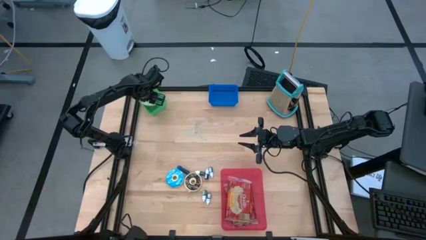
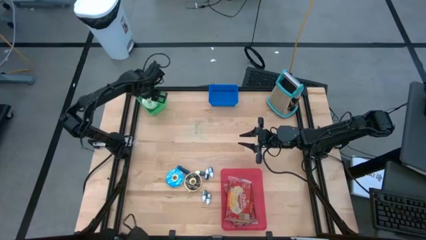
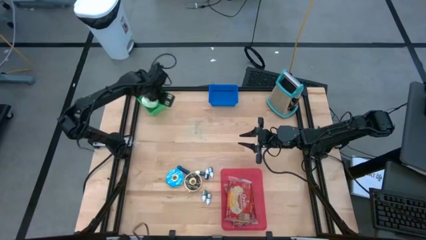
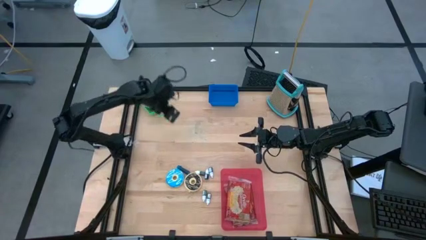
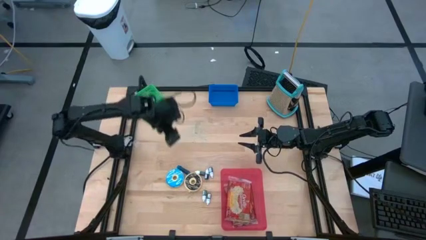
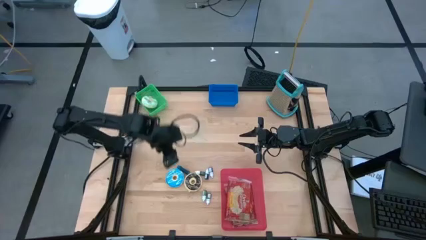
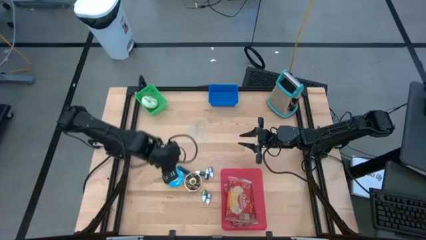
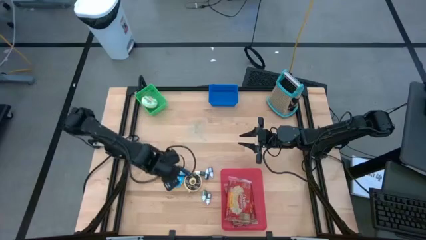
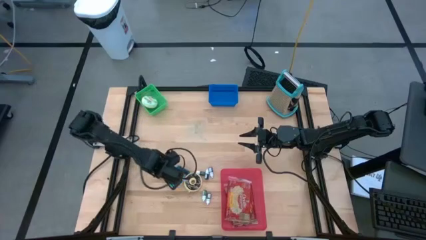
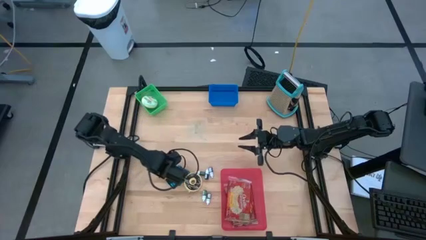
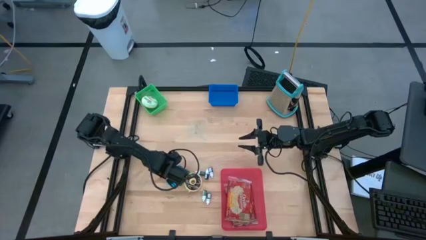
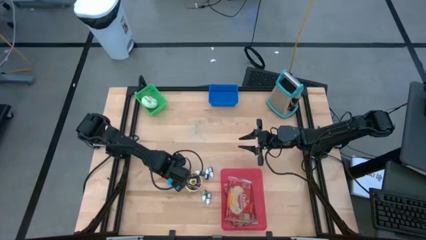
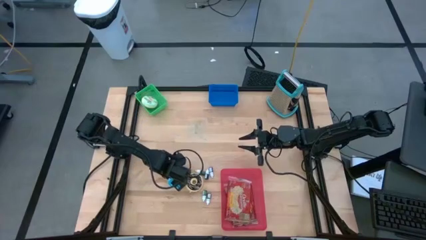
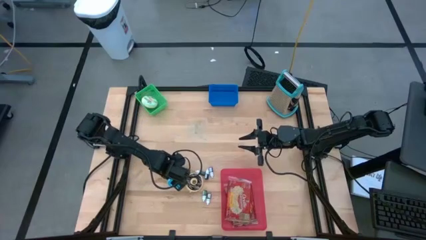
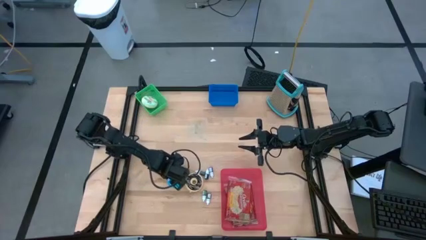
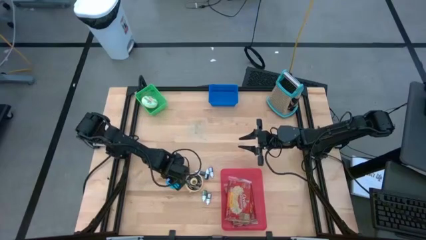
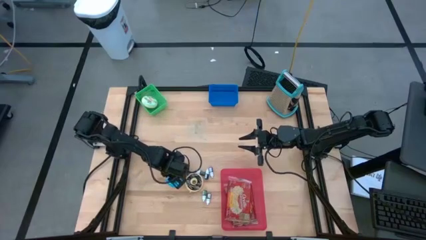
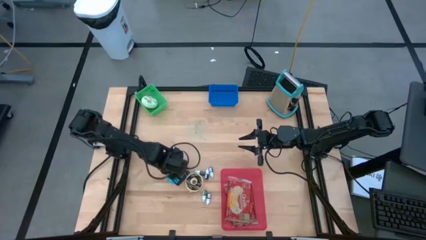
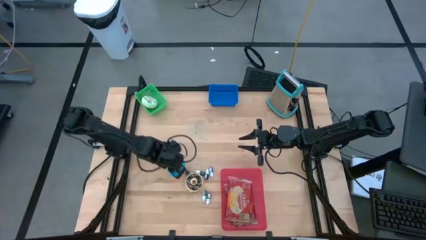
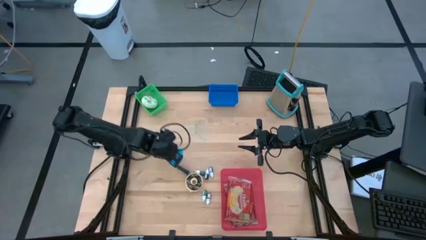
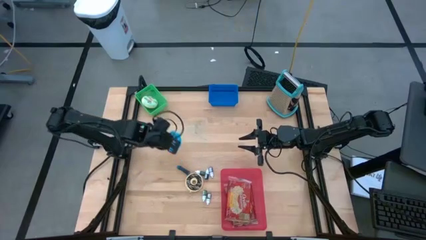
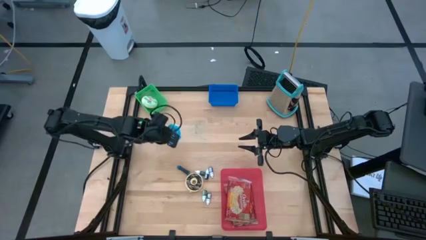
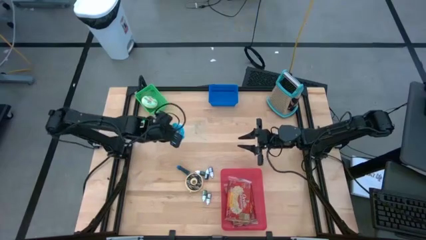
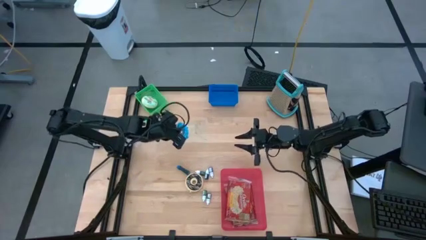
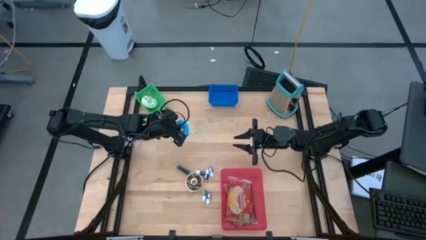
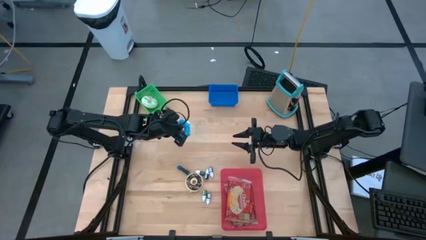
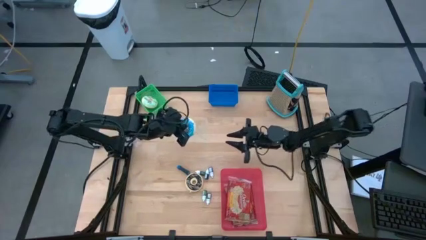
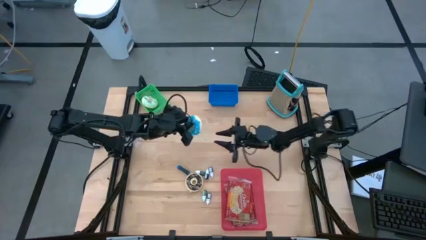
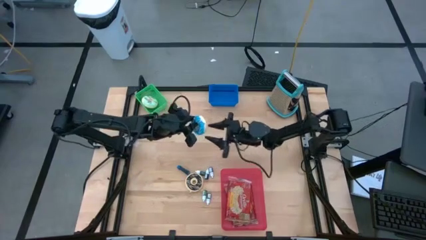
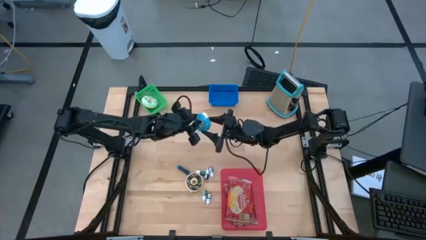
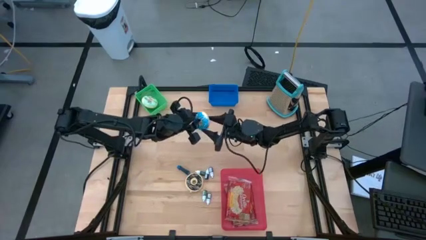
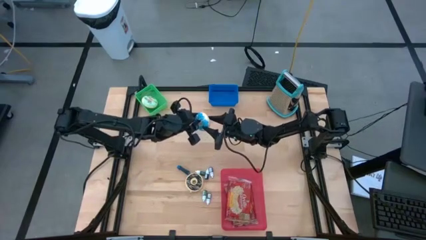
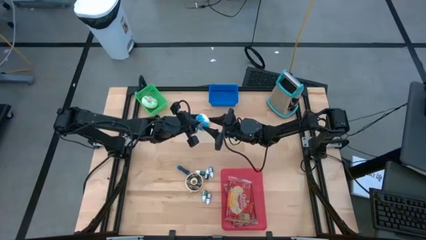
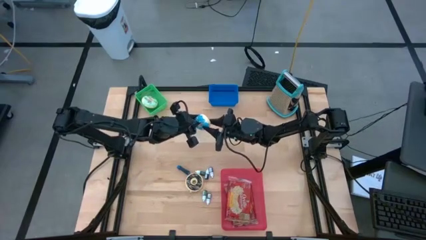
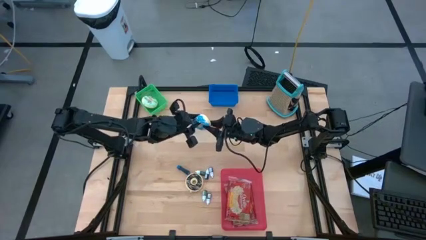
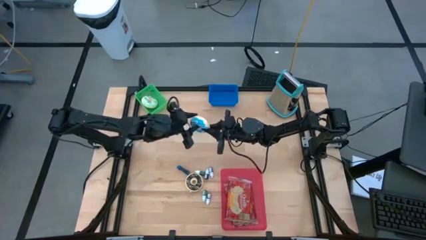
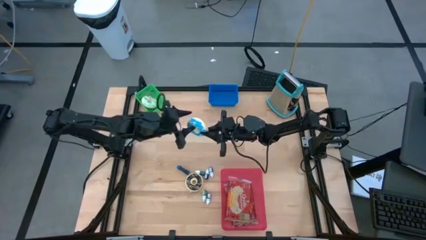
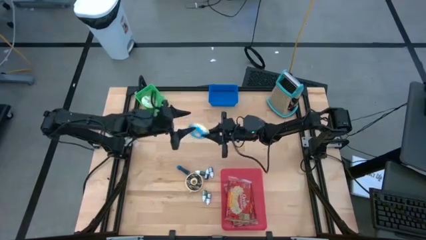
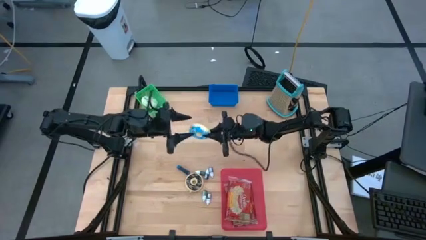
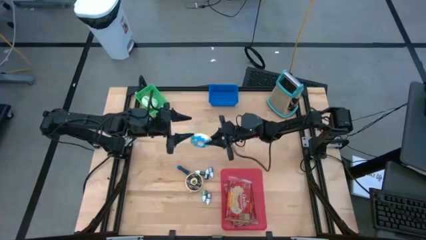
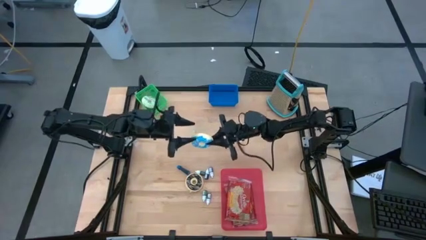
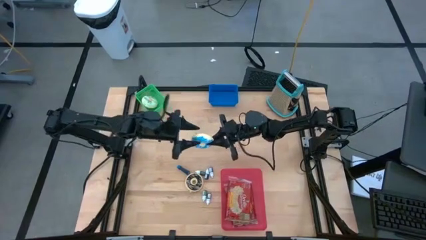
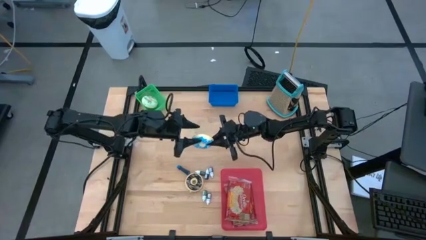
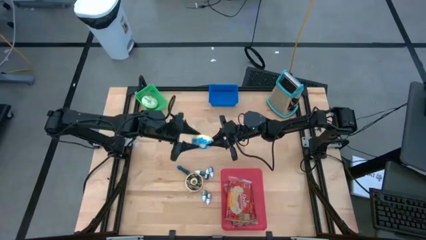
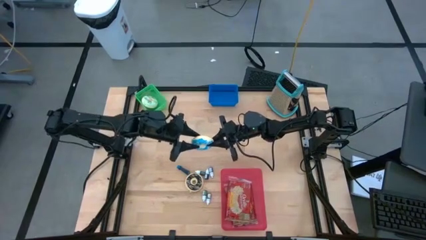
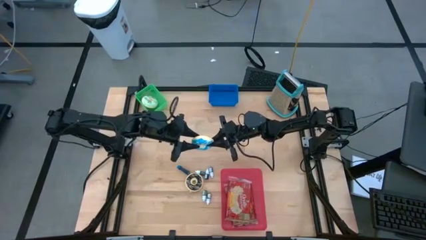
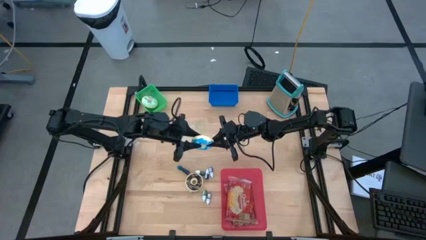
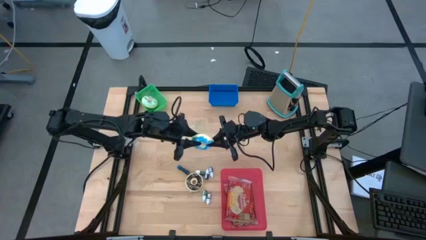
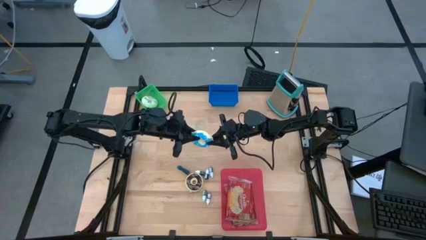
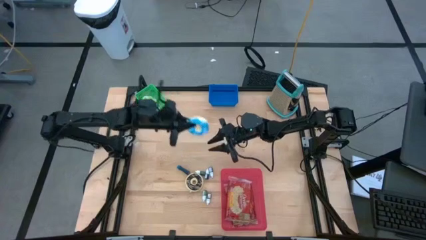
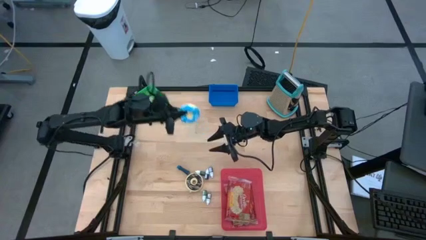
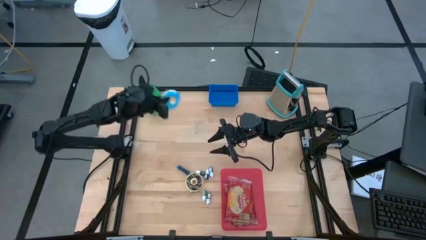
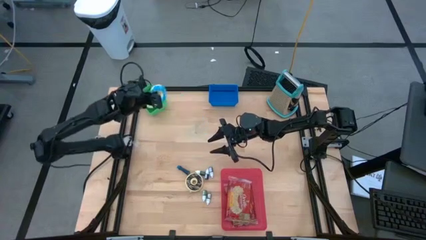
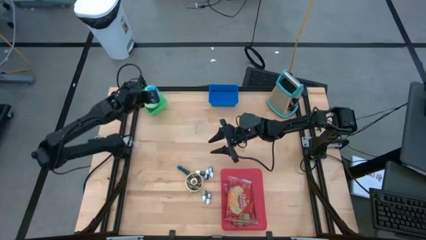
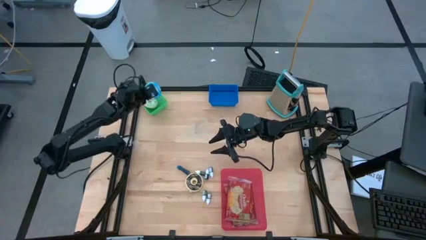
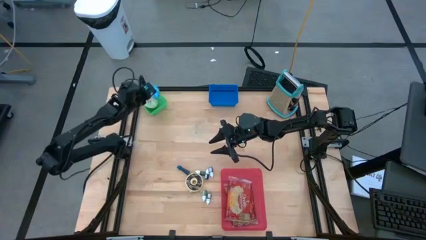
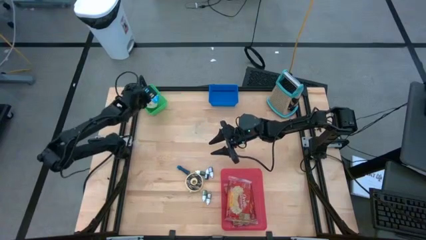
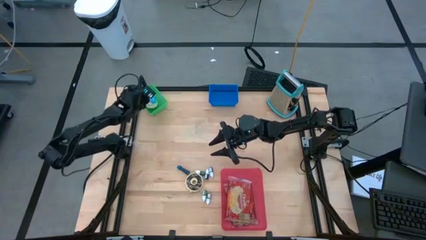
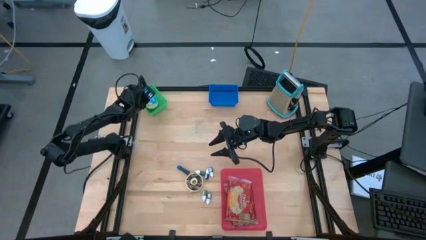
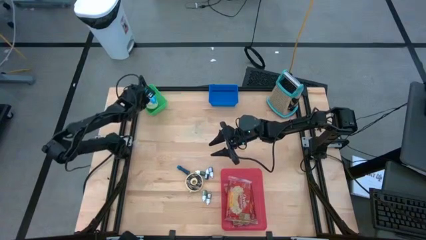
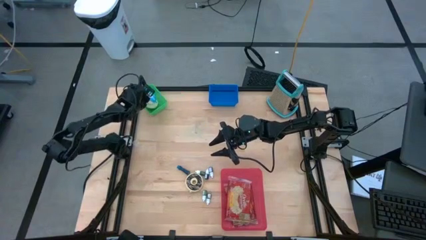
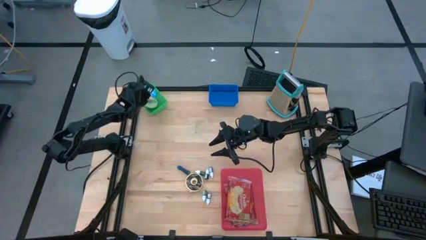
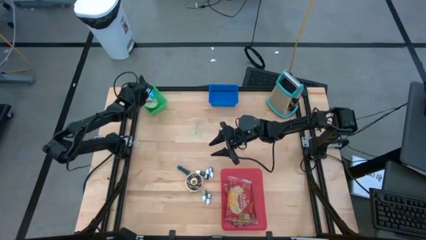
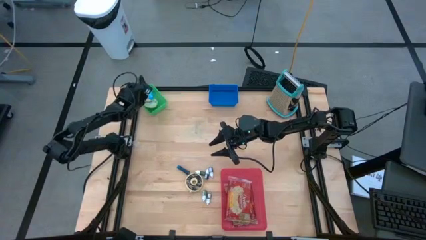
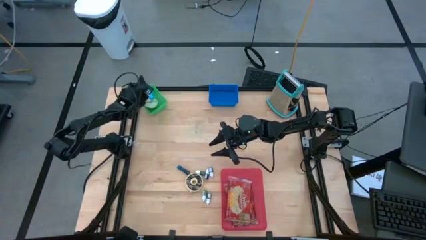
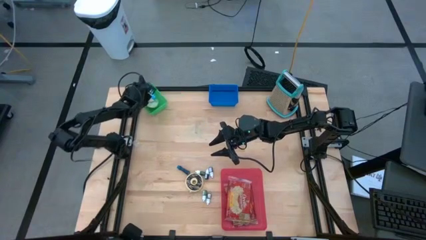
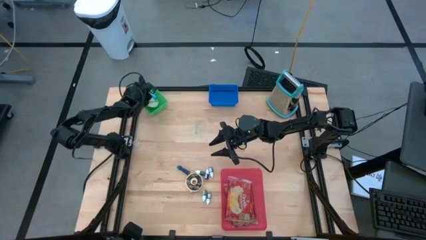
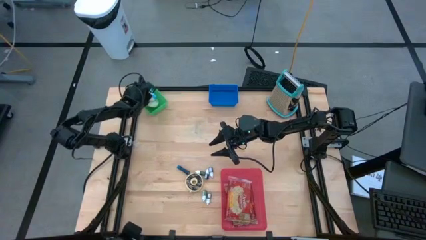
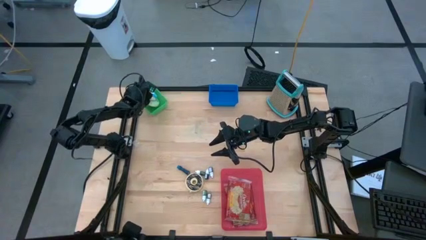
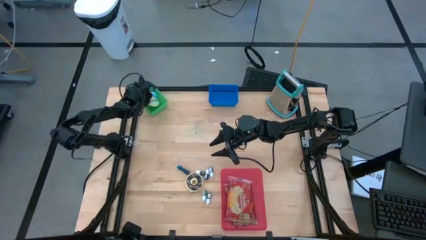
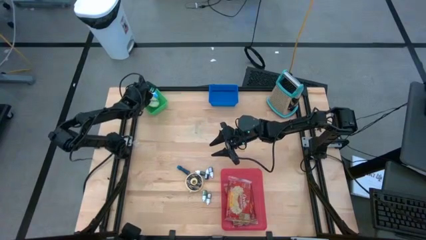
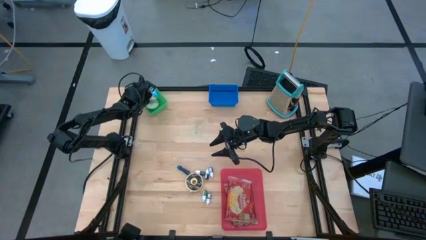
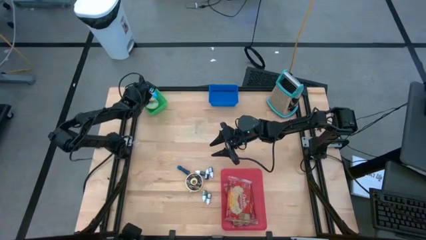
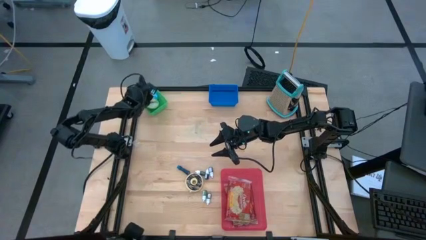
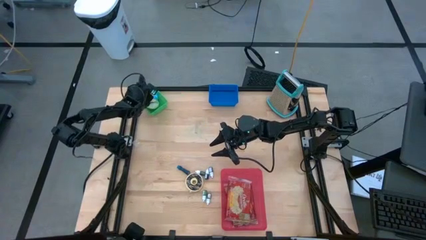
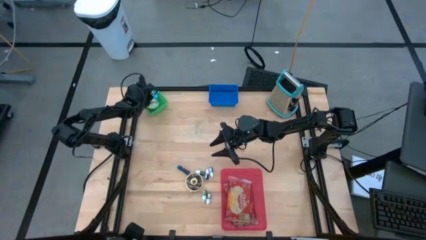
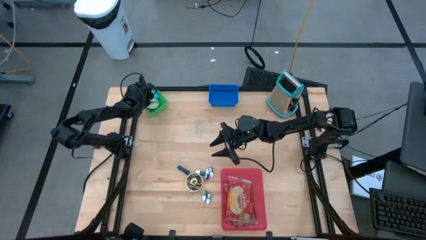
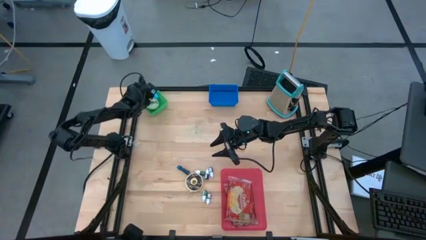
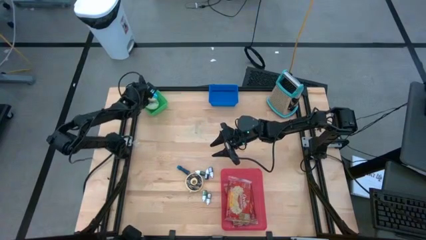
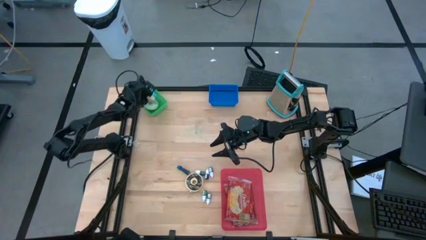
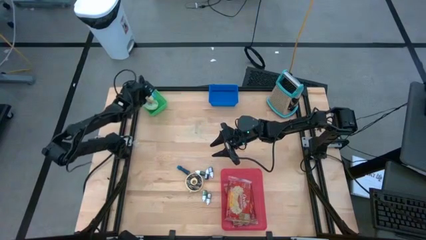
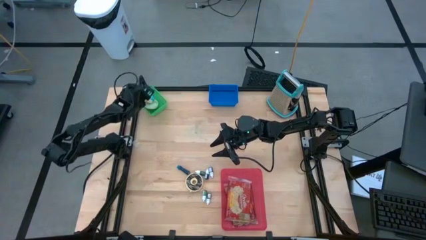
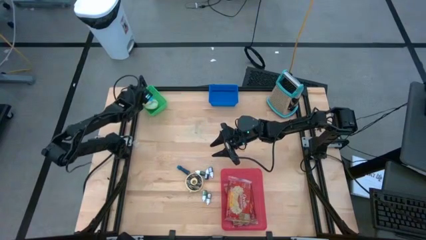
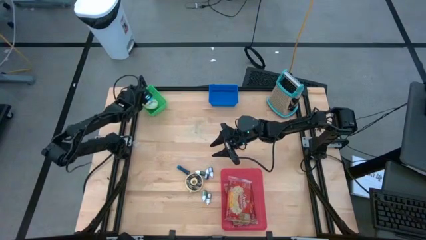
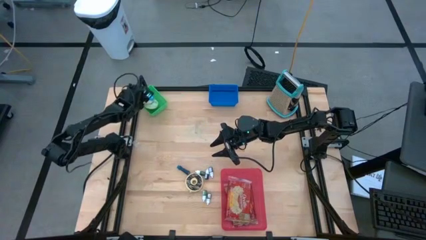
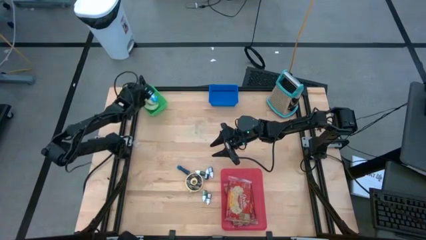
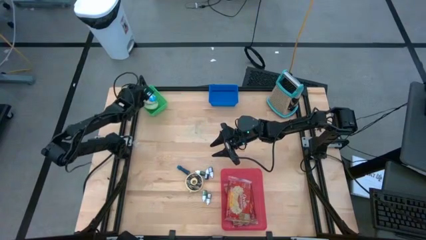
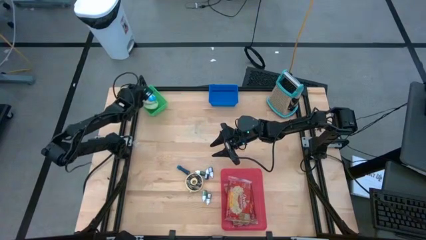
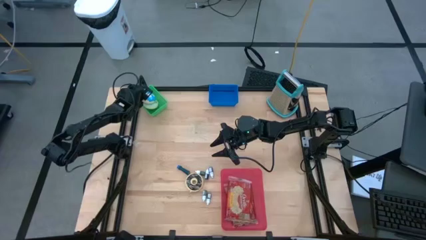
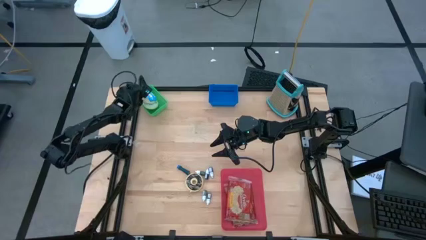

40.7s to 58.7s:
Put the blue donut into the green bin
